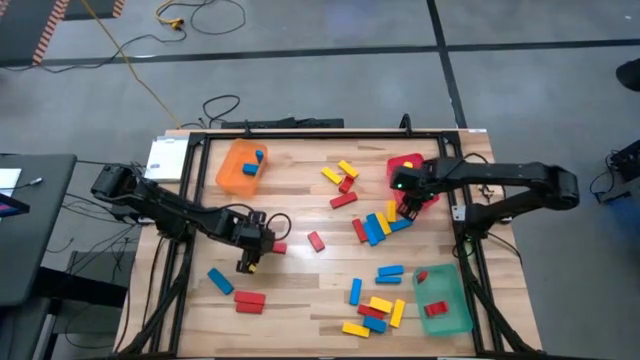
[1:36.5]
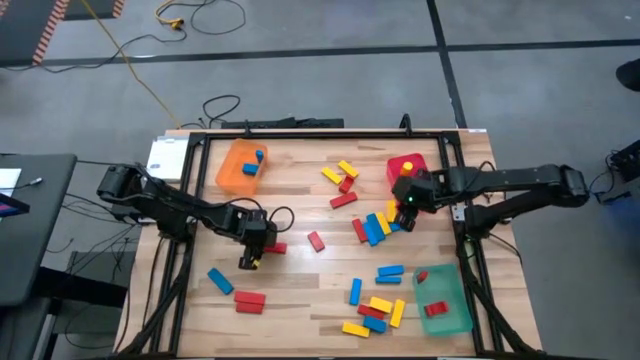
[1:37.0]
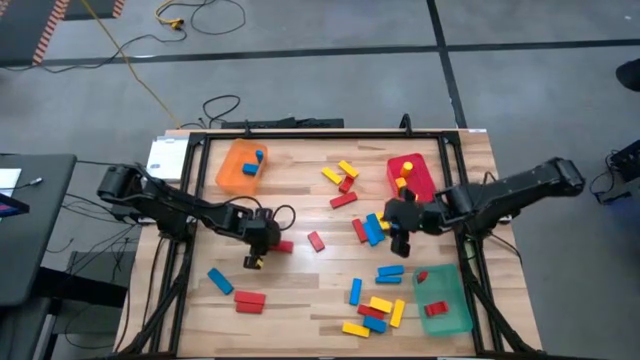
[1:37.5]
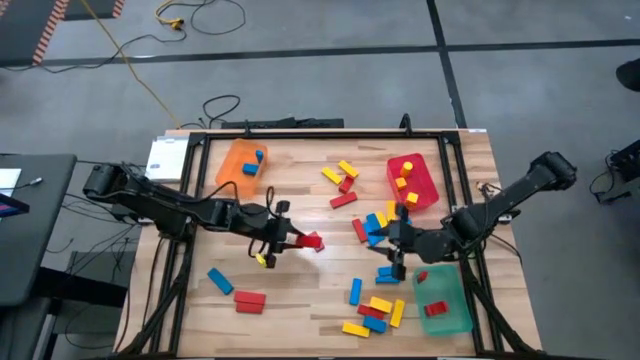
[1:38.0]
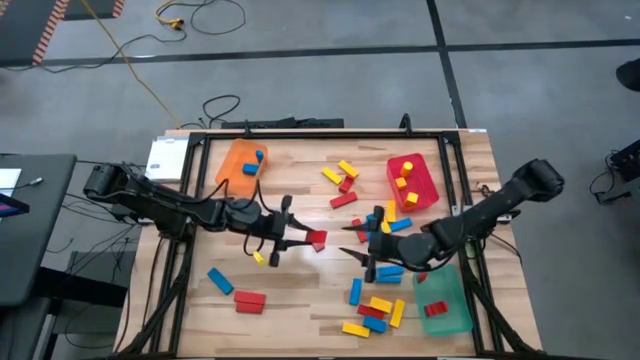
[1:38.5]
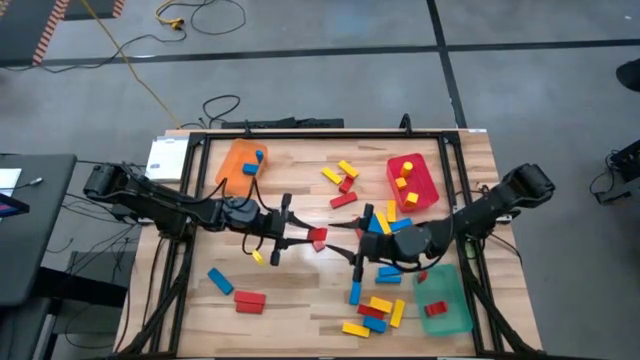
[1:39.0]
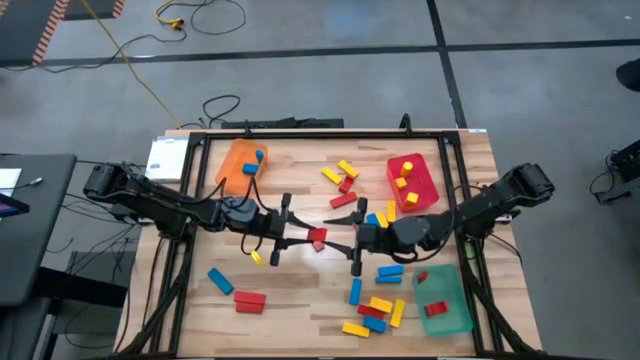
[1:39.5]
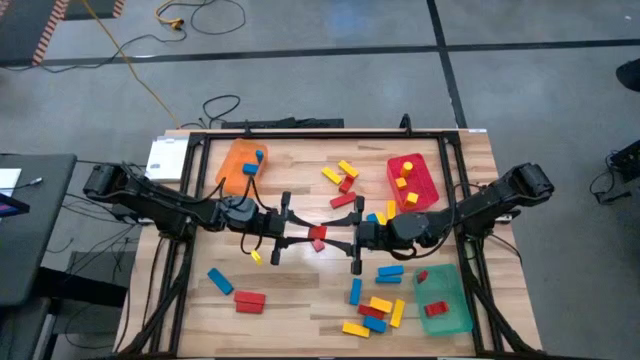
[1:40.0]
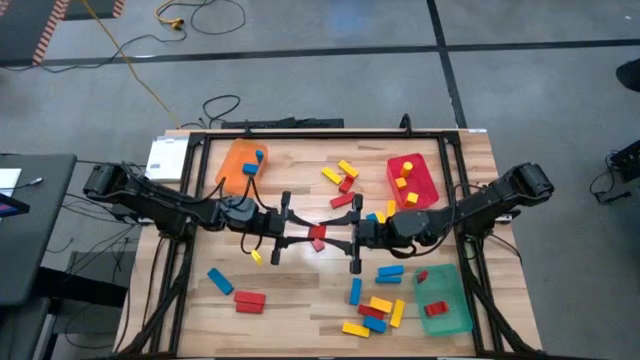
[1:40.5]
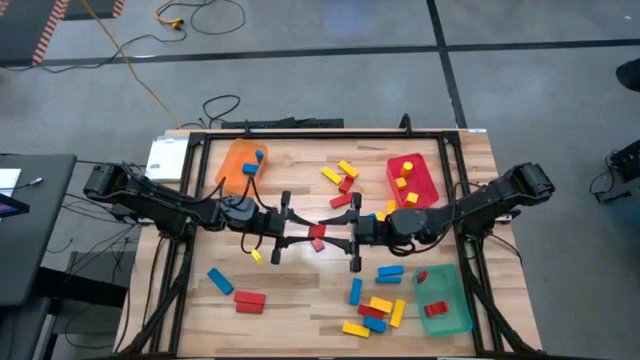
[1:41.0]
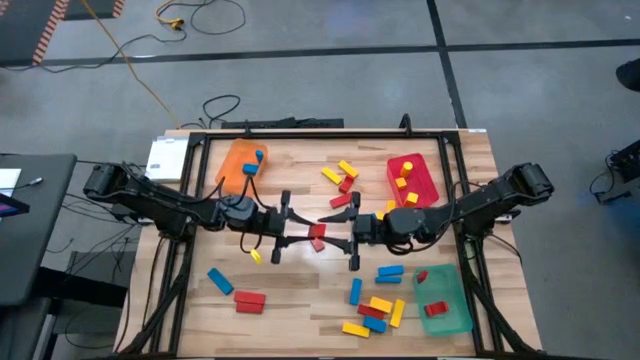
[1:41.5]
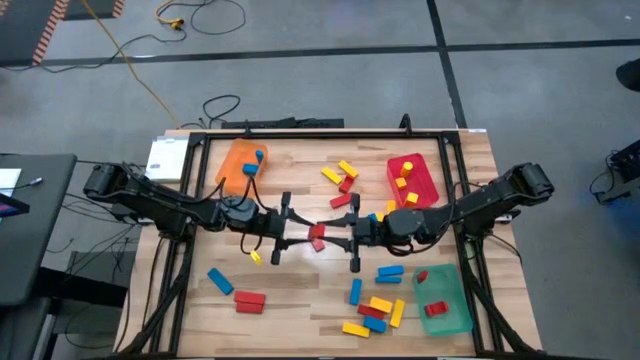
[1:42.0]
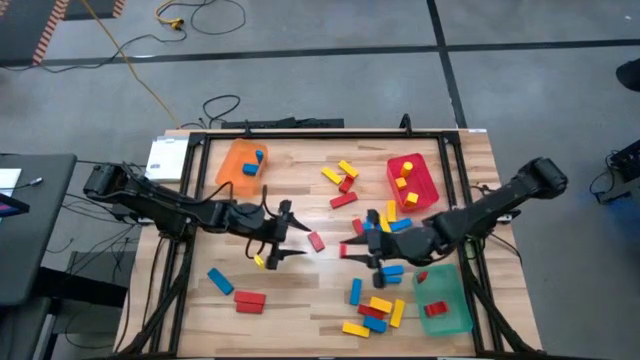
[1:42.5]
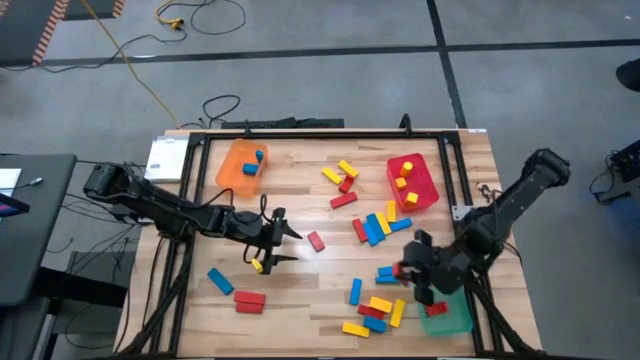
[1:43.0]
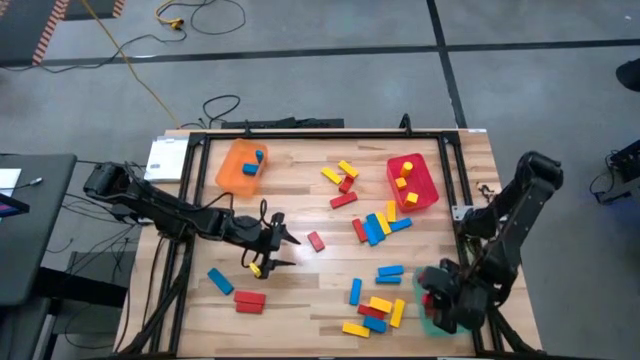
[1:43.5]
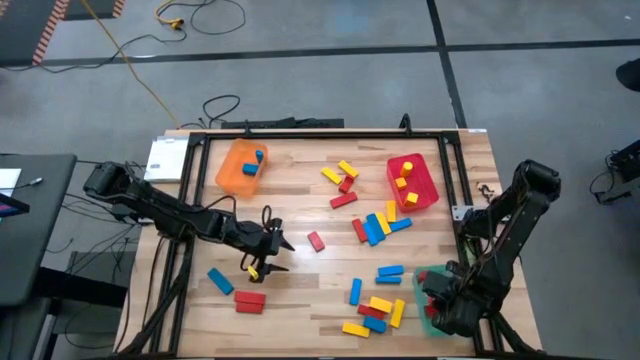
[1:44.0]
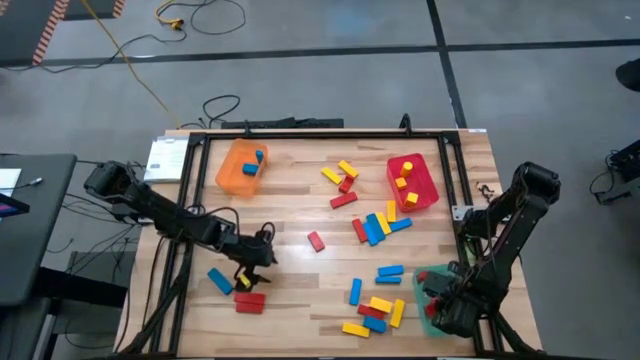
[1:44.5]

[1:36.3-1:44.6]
Task: Sort blocks
Put the red rectangle block into the green bin

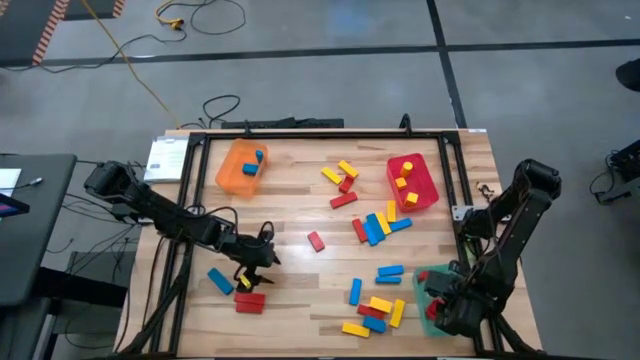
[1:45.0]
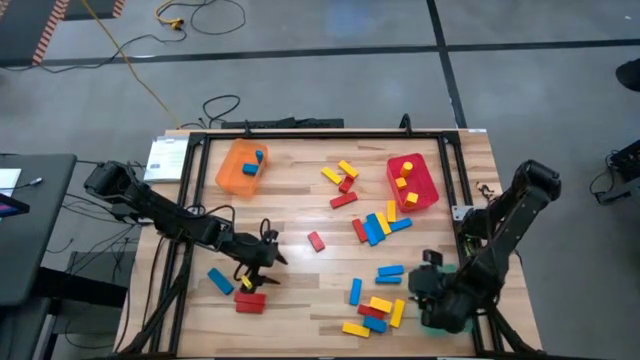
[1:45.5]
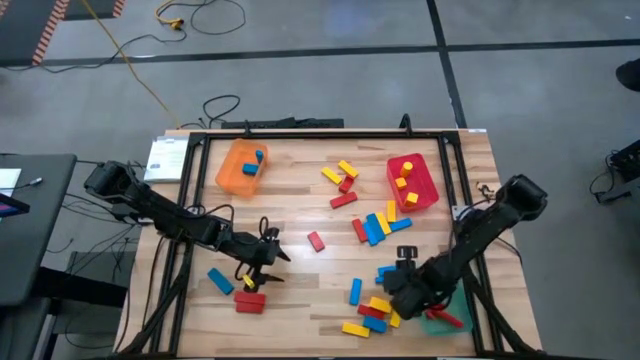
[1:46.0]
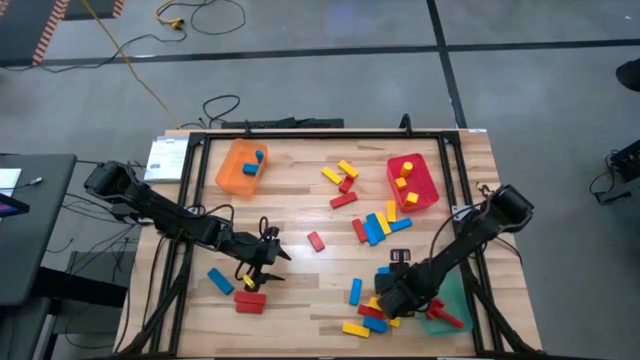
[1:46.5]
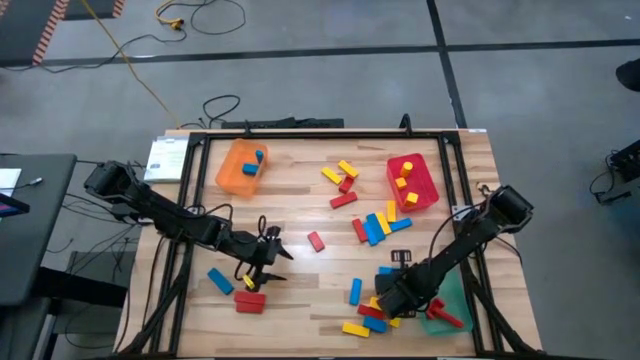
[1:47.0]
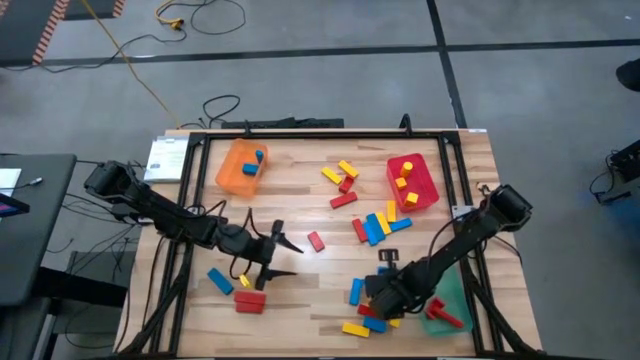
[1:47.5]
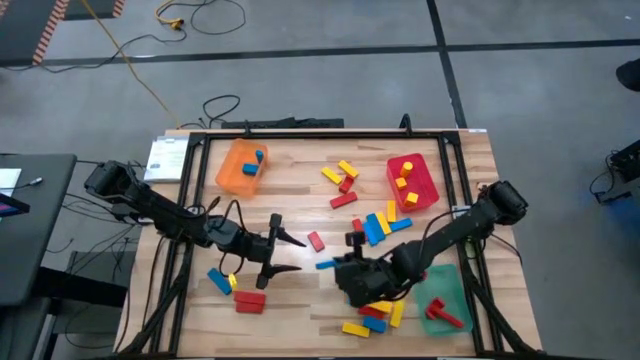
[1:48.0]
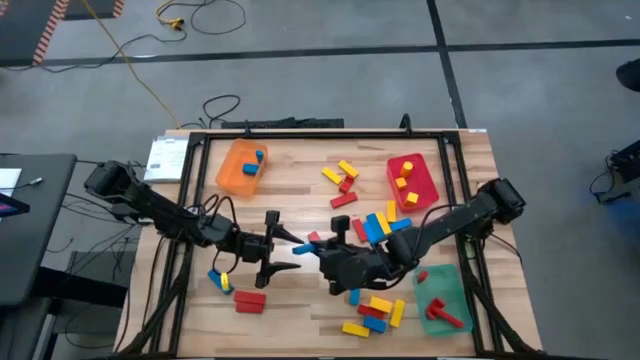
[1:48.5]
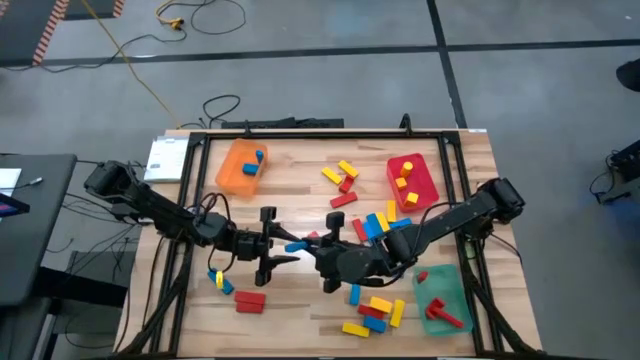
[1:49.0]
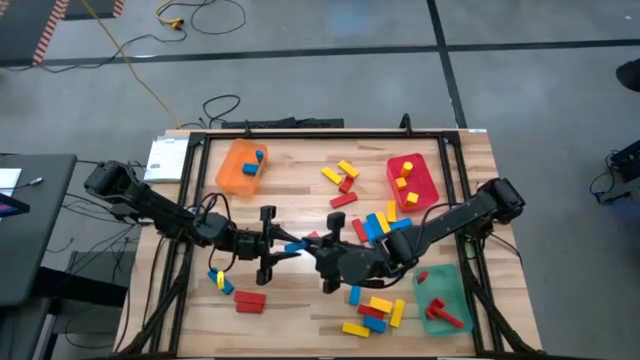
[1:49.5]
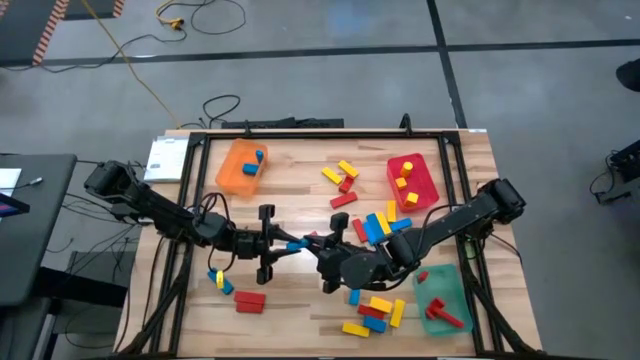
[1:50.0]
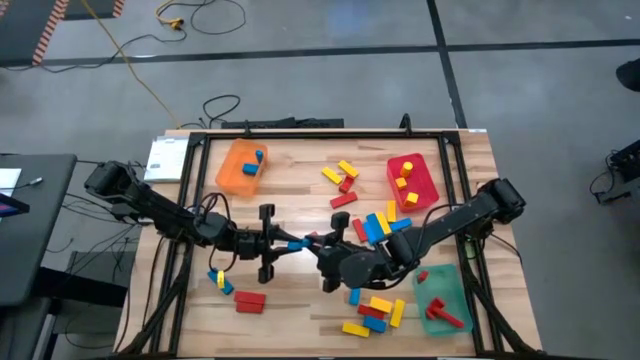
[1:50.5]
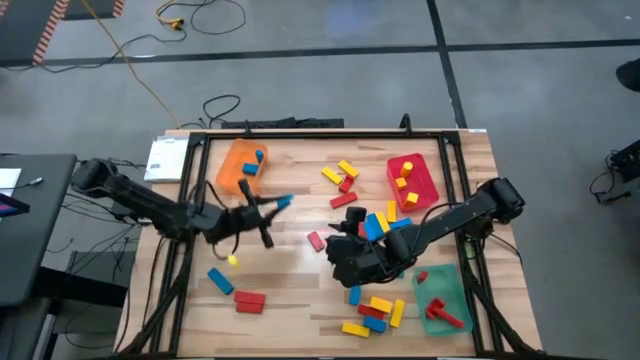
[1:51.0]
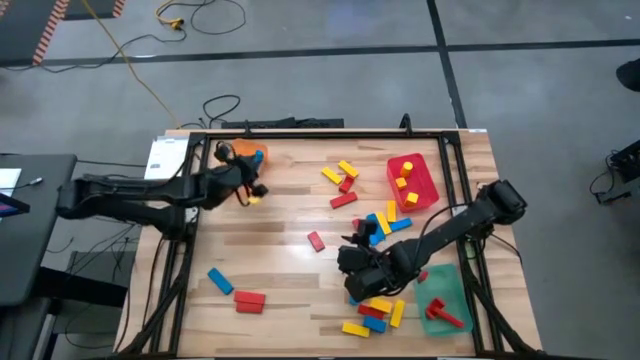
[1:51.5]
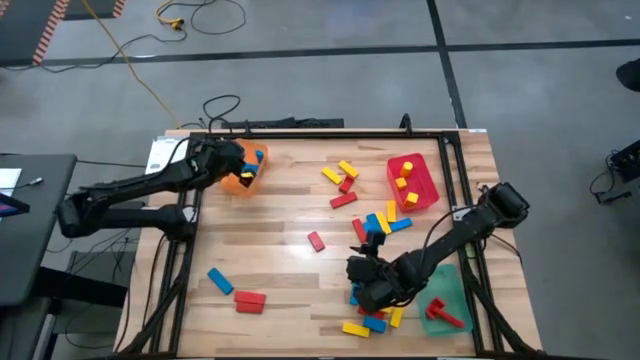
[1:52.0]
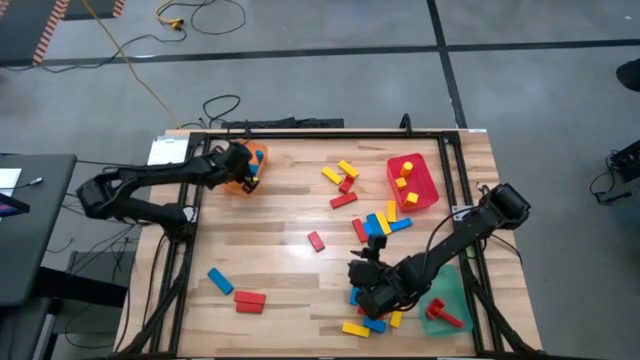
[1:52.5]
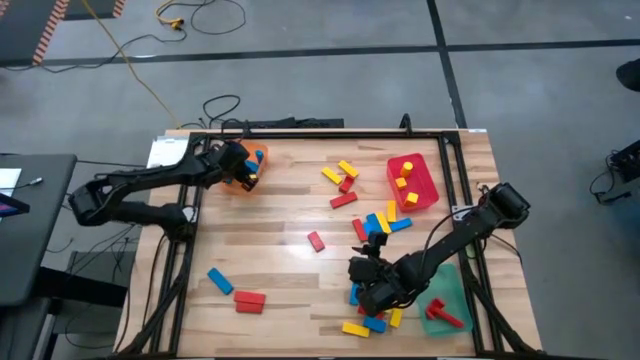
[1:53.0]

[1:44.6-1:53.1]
Put the blue rectangle block into the orange bin

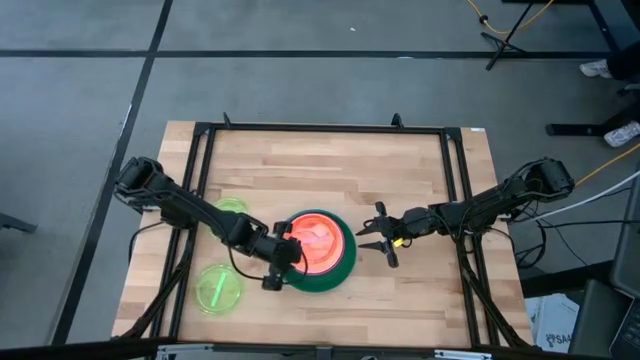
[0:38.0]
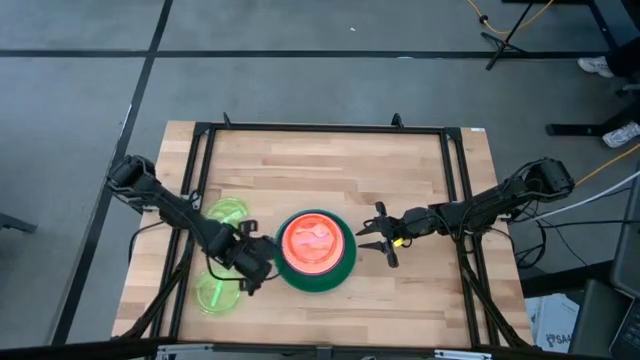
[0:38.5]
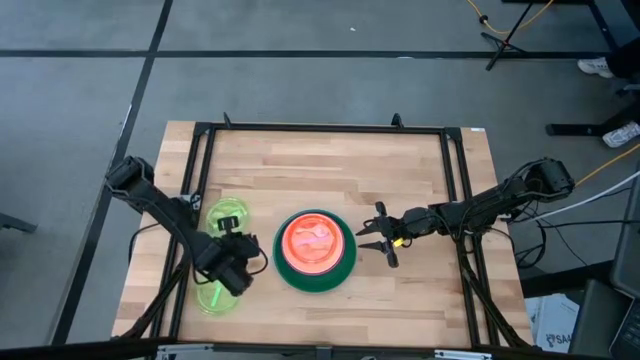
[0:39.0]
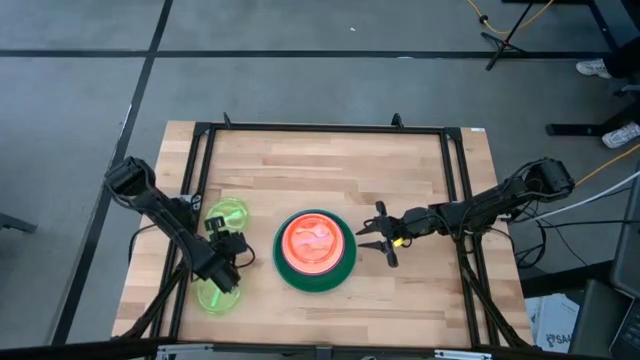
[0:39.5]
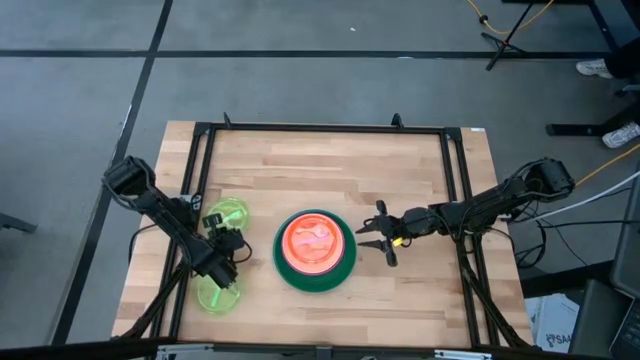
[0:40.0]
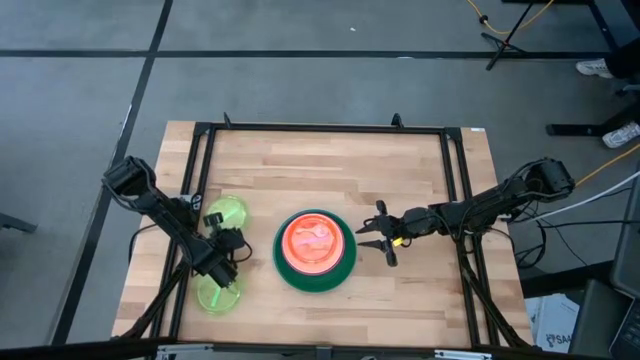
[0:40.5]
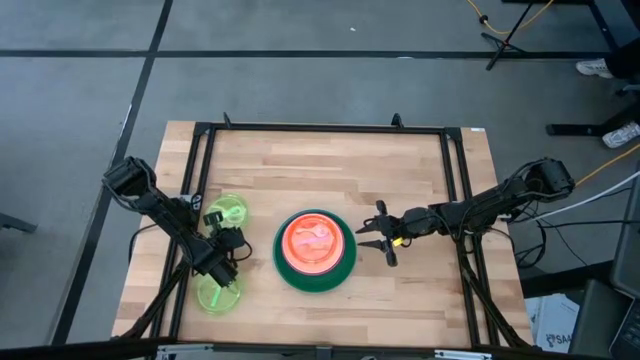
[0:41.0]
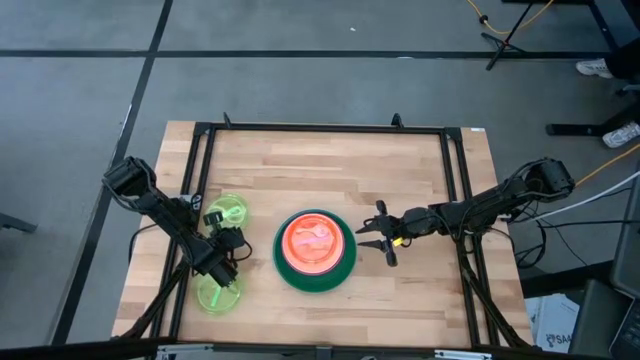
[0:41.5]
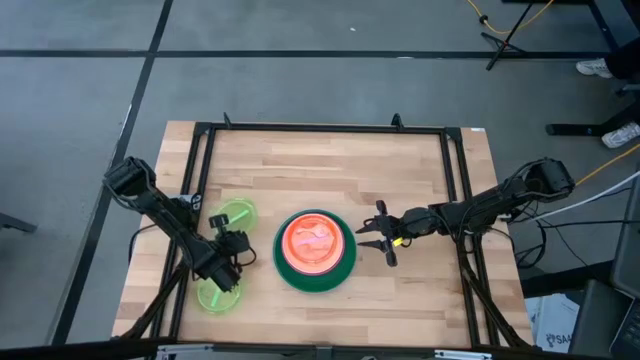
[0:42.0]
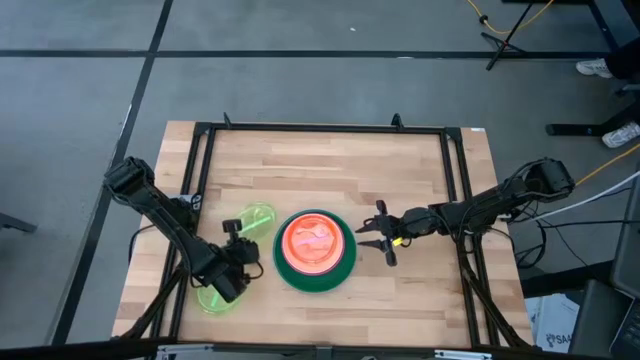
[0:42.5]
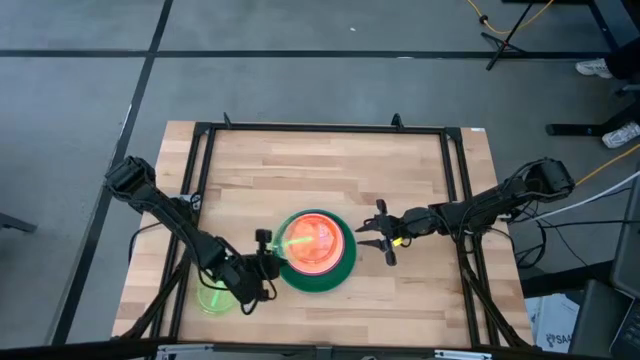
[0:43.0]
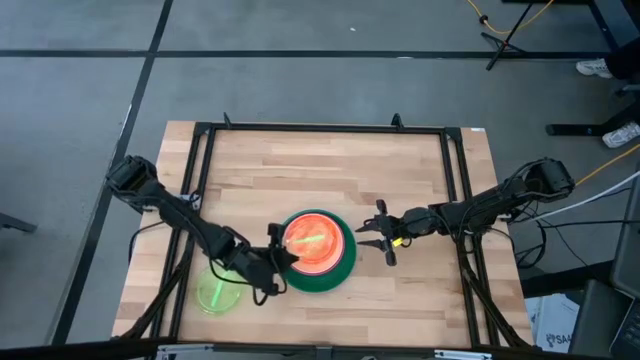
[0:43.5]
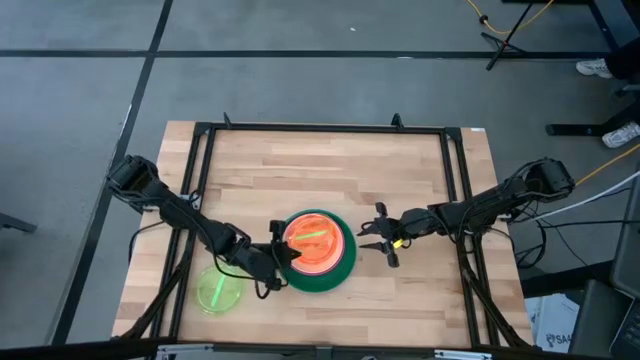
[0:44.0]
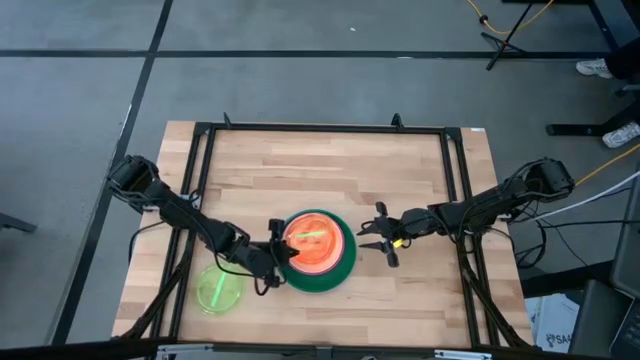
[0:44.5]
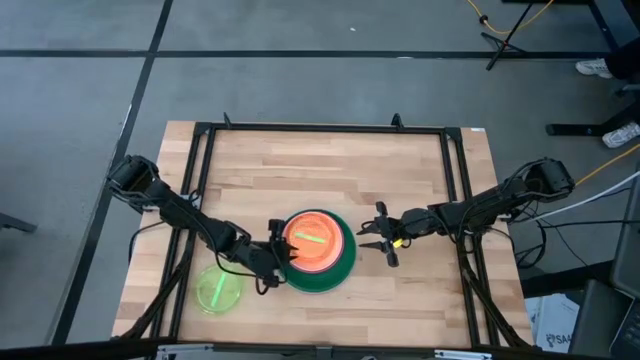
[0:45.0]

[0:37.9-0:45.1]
Task: Stack plastic plates
Stack the top transparent green plate on the stacked plates
